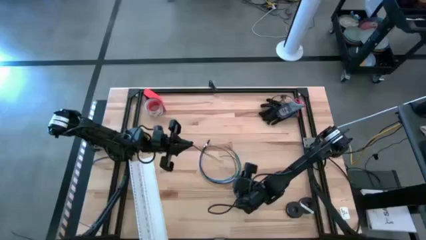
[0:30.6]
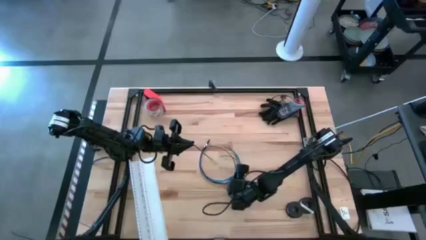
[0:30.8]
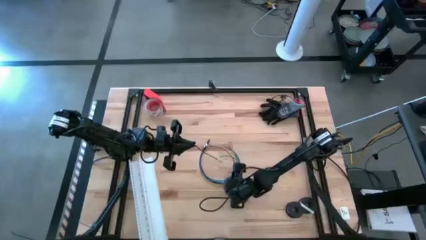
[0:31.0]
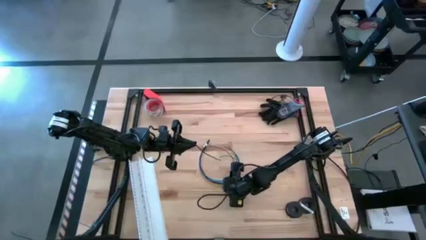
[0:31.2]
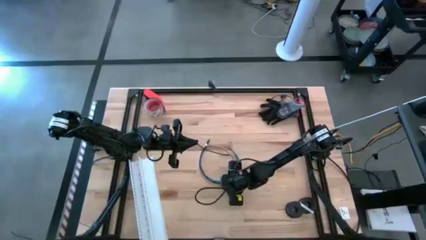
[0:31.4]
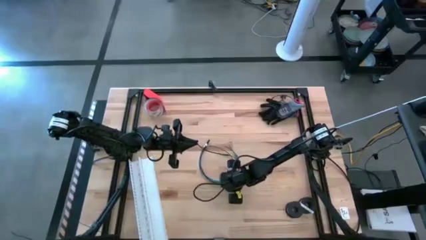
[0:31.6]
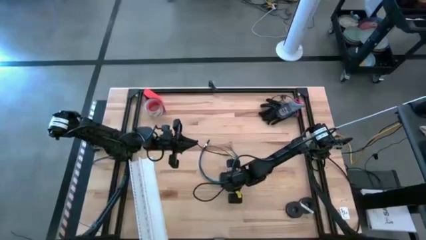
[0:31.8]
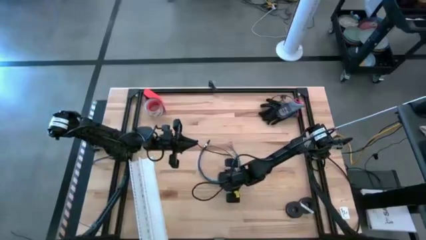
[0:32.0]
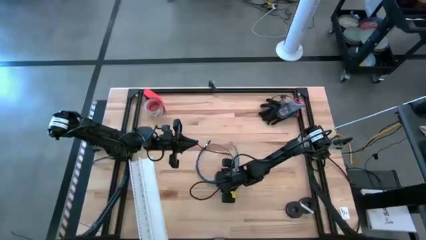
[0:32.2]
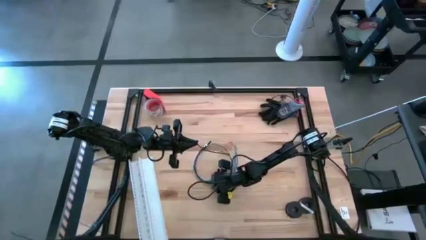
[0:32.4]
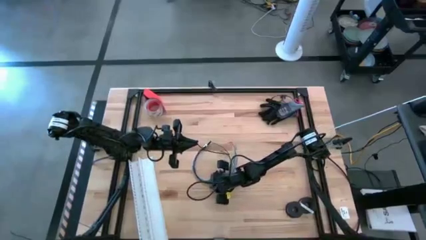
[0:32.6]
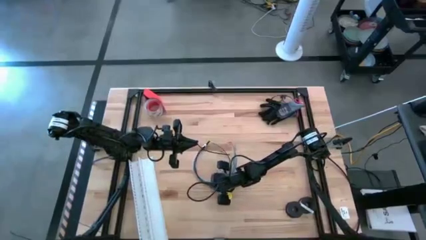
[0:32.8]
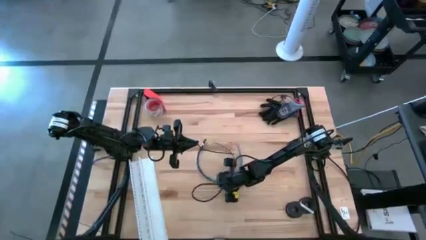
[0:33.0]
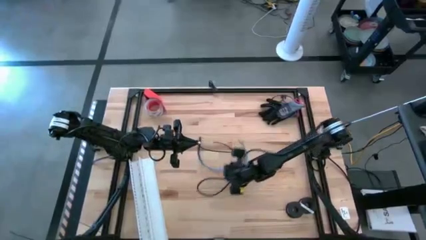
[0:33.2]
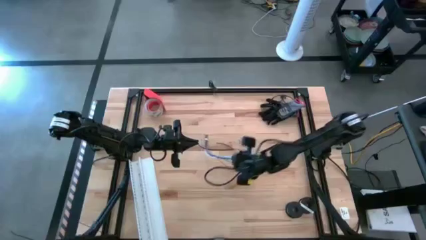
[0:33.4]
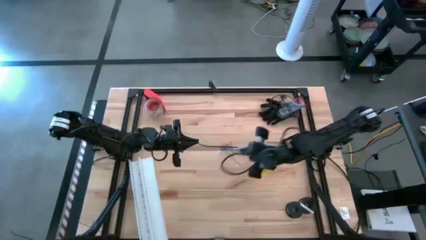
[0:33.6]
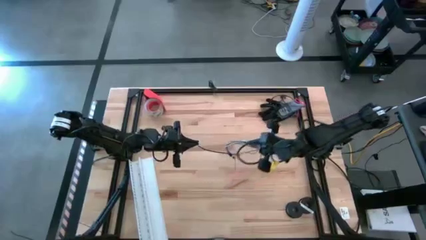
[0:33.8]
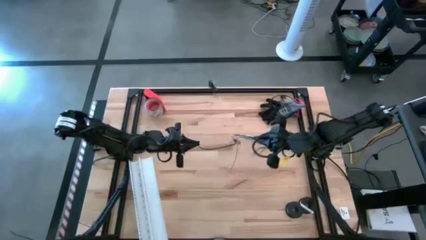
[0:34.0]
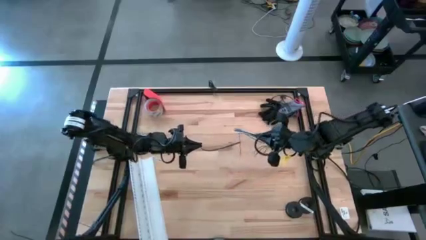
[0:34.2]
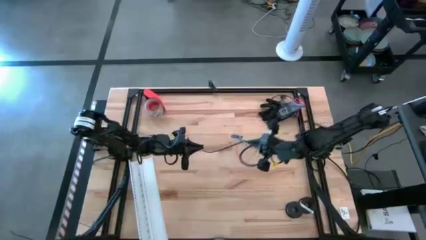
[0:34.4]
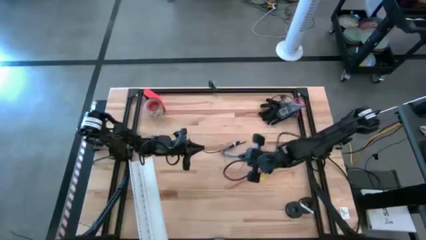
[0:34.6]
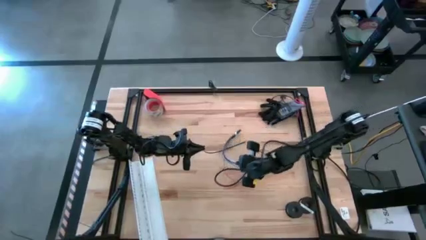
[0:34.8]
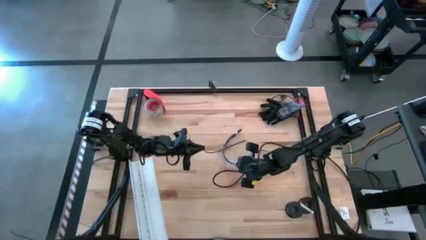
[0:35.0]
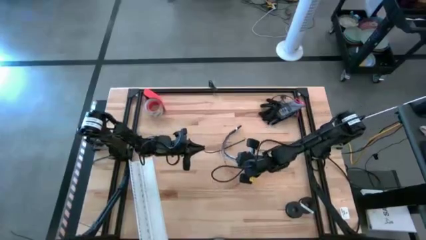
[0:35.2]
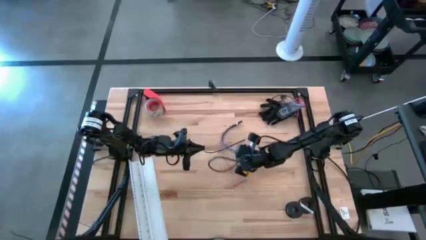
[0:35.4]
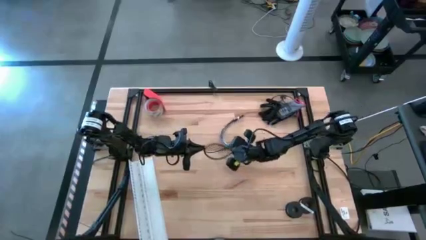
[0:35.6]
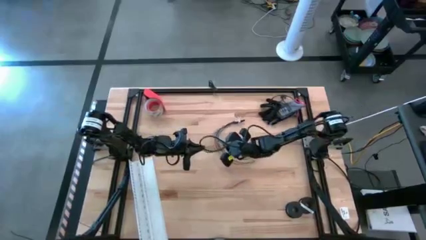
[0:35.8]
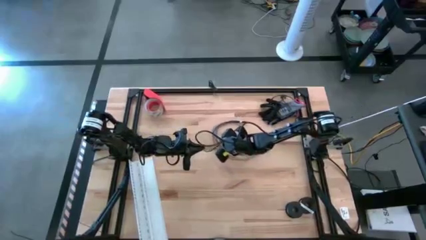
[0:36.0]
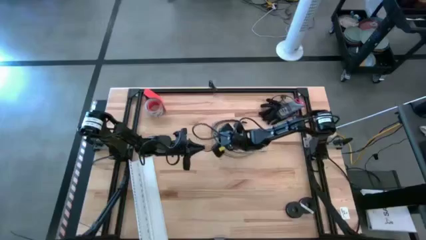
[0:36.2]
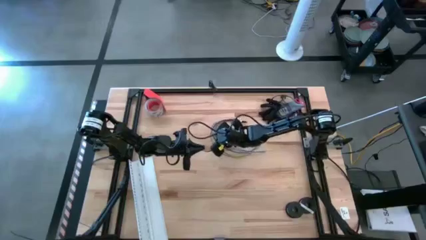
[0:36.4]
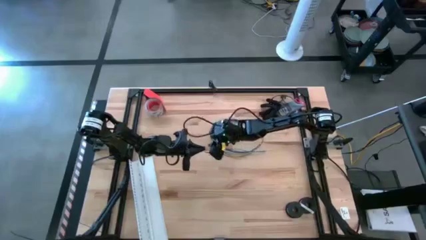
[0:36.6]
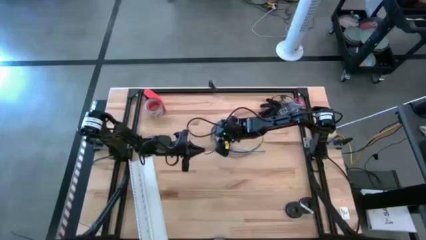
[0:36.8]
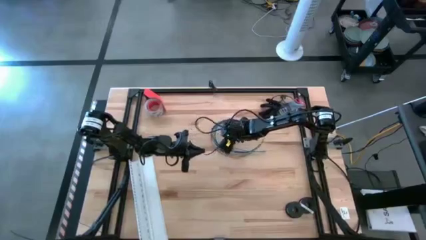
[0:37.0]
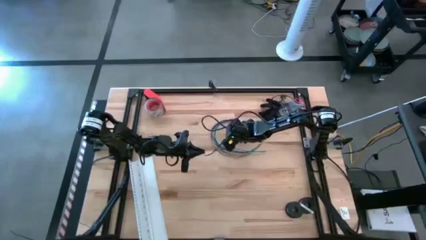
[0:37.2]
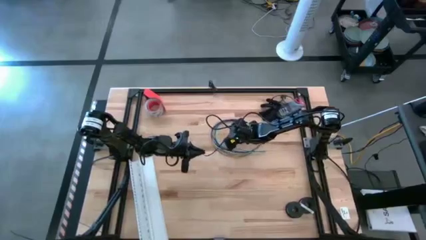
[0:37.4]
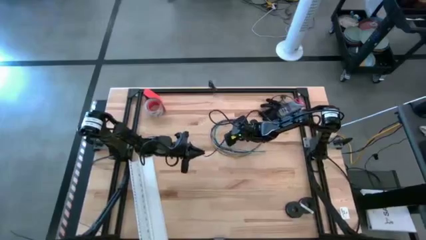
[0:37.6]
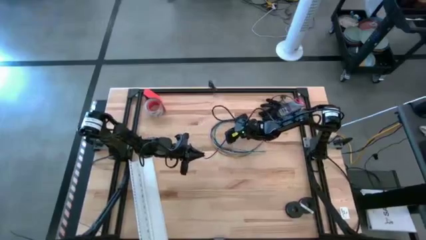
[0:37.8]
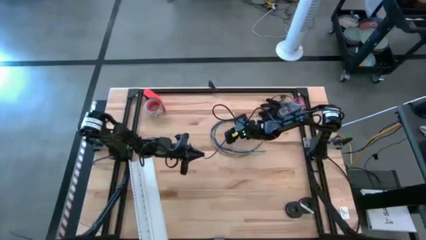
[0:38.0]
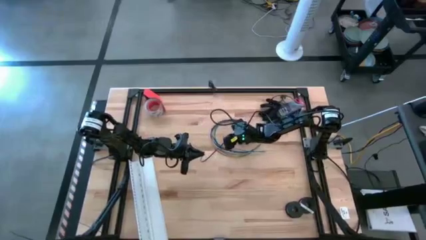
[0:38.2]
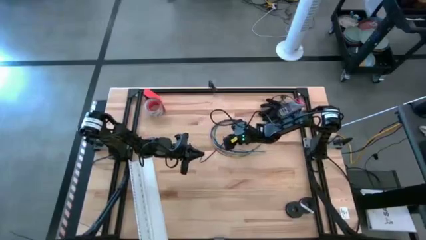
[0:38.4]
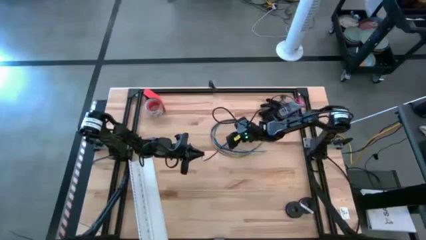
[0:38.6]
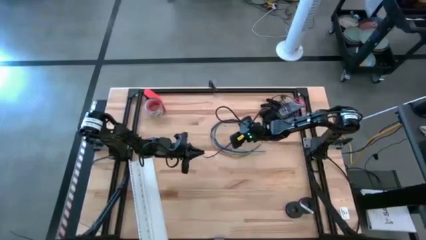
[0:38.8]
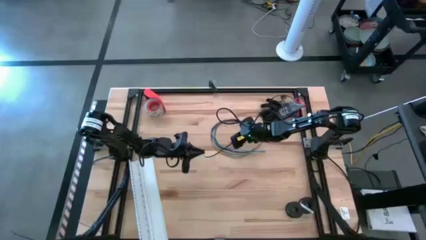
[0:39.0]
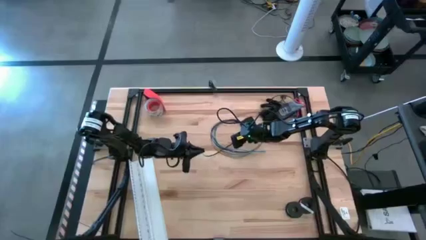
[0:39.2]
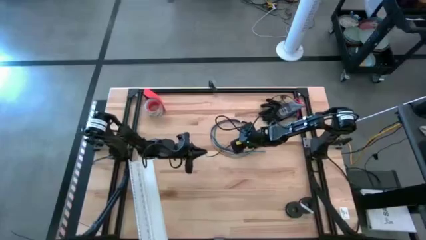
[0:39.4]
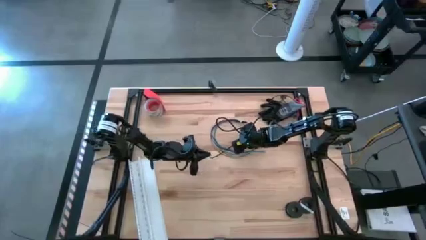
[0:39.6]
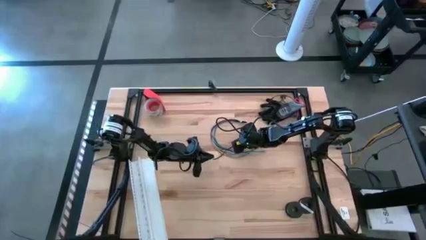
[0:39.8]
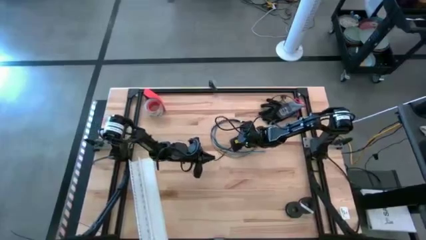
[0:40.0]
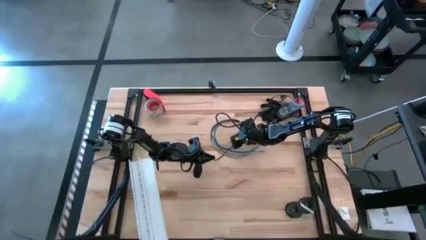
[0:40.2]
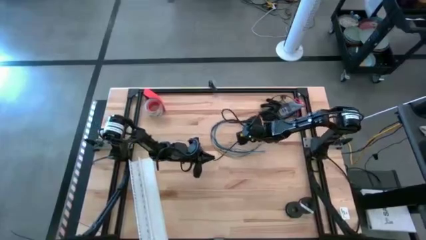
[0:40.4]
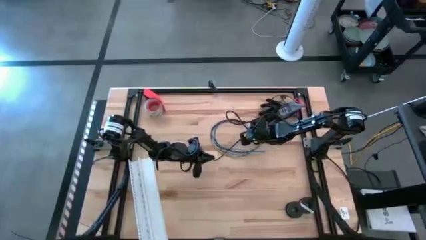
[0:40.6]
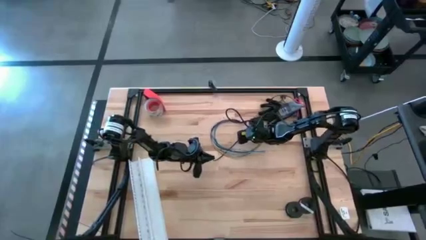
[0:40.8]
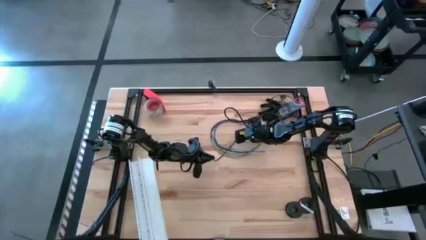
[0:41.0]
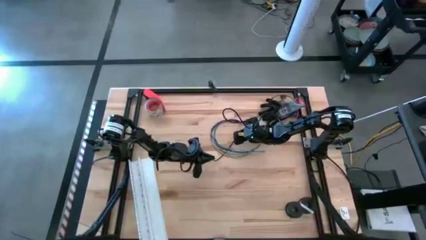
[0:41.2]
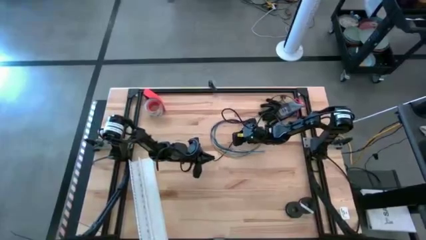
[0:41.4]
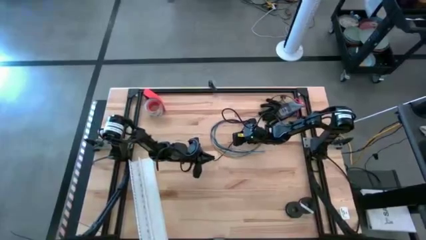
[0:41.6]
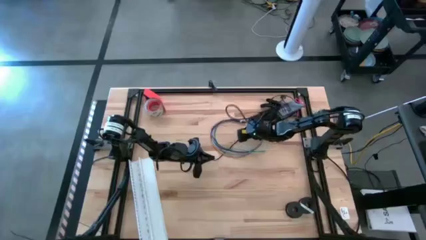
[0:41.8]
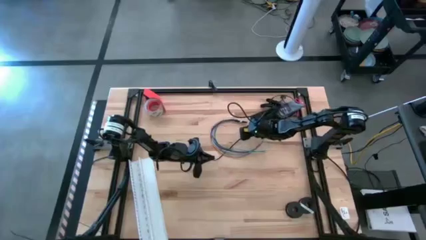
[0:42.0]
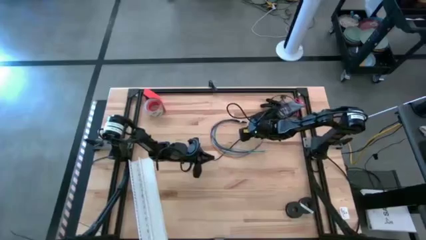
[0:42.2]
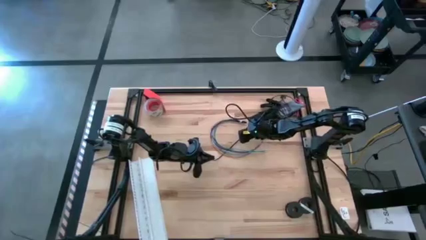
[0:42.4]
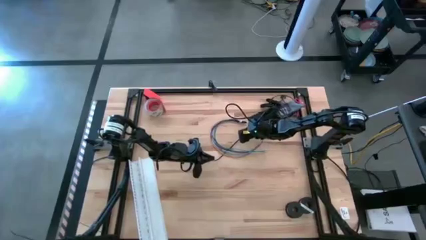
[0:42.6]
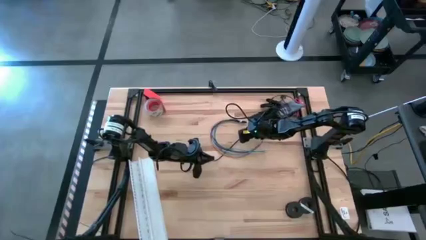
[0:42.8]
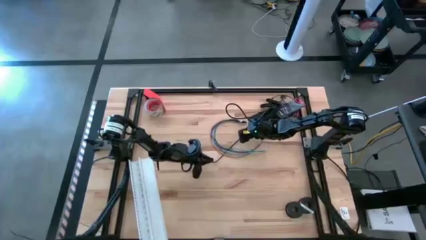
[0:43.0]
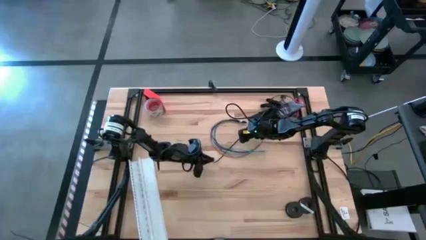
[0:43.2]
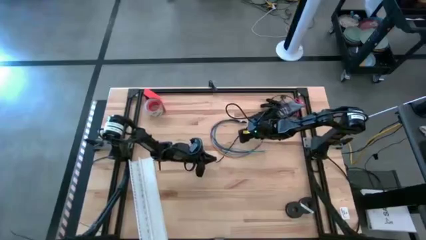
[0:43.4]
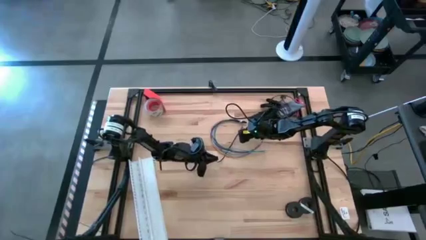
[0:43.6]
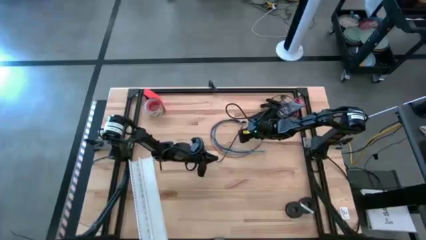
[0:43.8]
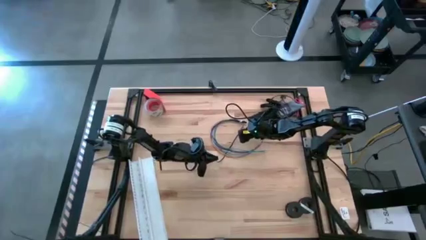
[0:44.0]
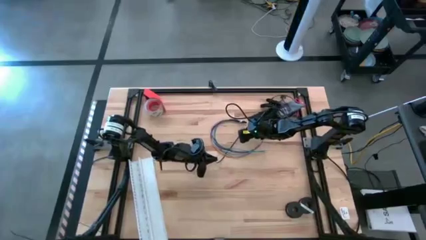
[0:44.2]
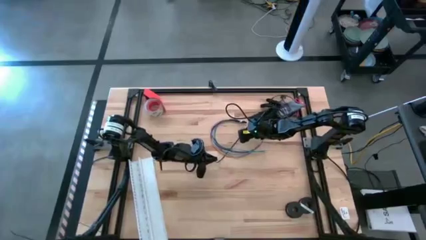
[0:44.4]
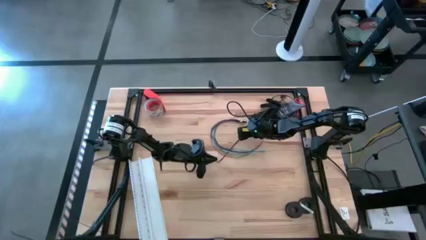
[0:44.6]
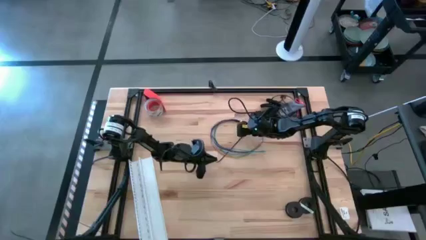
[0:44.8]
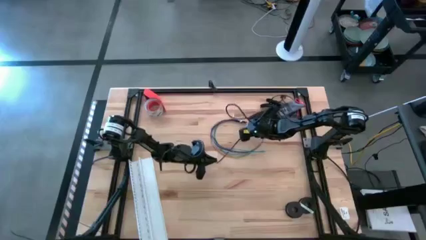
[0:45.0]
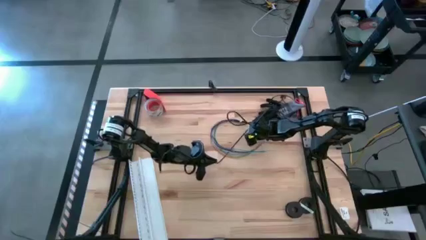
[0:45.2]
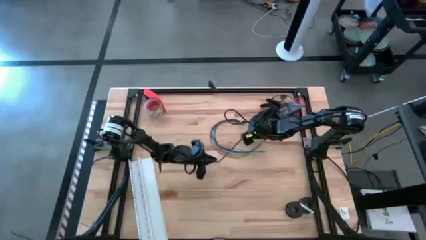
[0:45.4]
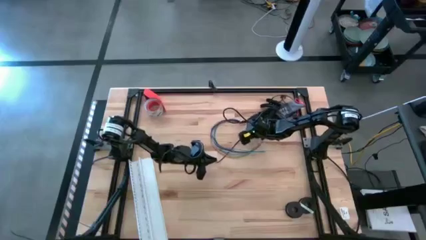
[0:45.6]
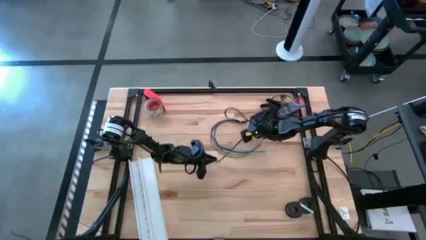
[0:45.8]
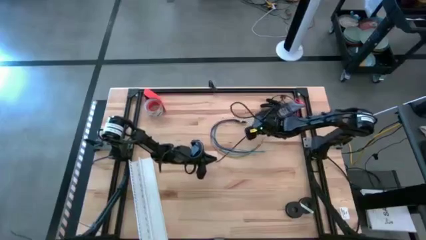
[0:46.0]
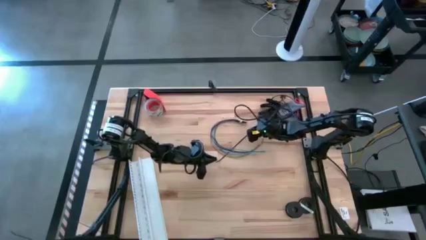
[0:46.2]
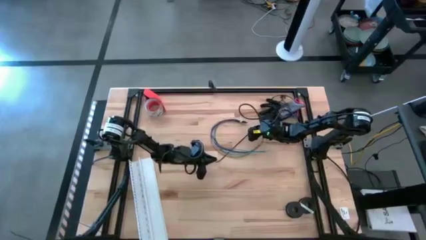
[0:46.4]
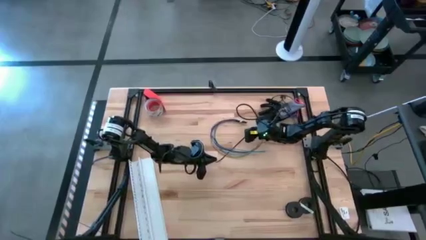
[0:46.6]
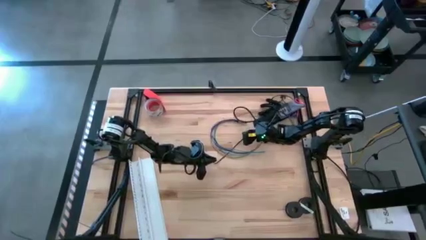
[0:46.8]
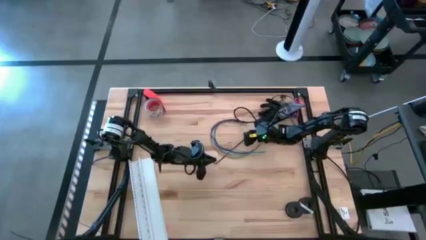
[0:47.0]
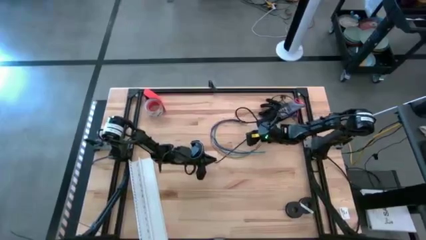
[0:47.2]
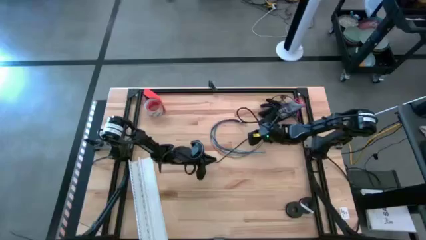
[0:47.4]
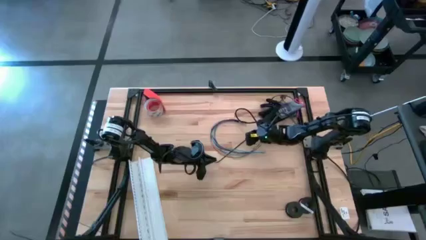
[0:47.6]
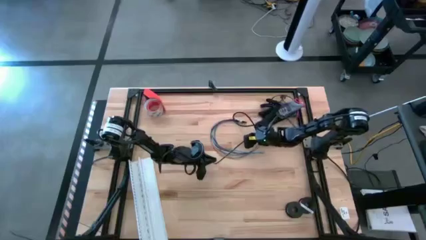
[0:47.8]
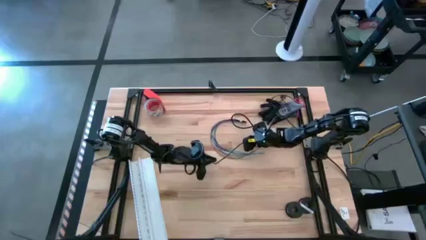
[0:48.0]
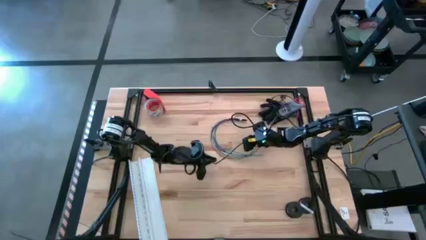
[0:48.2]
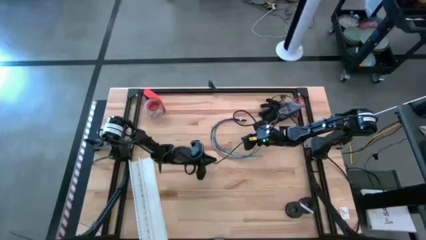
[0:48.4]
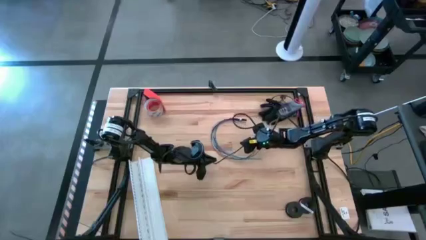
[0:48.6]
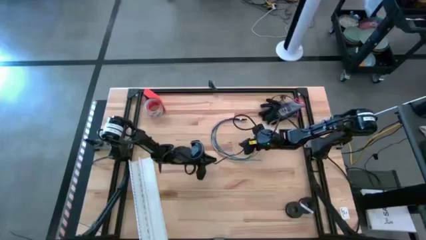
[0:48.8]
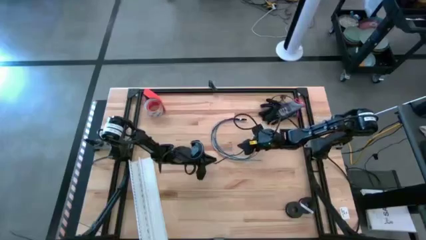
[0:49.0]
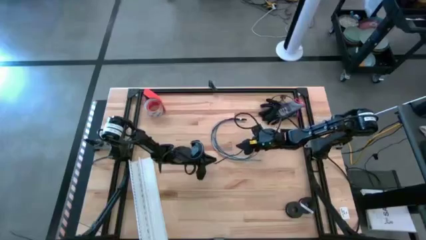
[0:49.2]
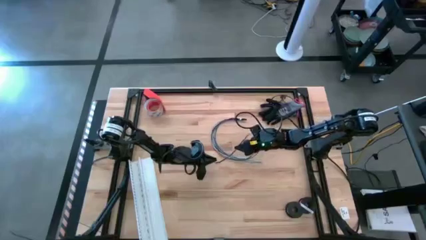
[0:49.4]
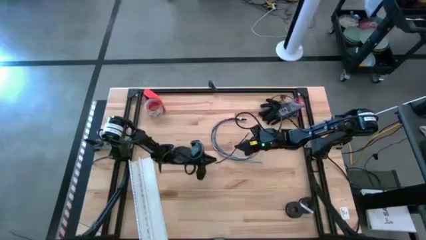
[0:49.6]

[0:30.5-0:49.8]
Task: Ziptie cables
Put a zip tie on the cables
